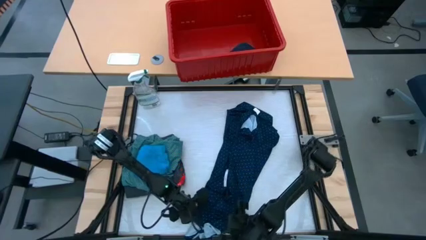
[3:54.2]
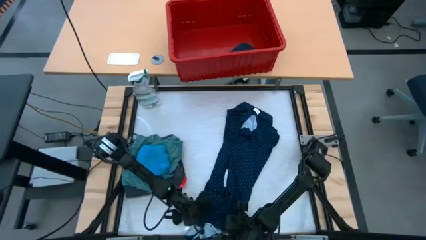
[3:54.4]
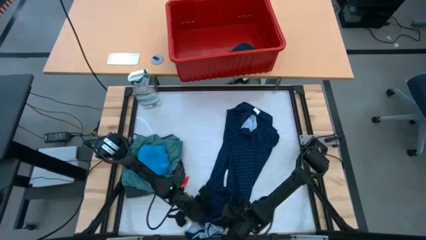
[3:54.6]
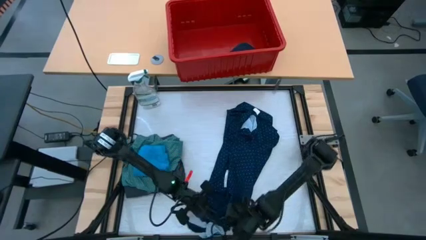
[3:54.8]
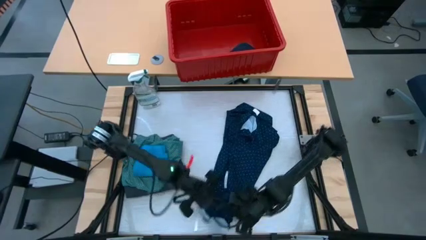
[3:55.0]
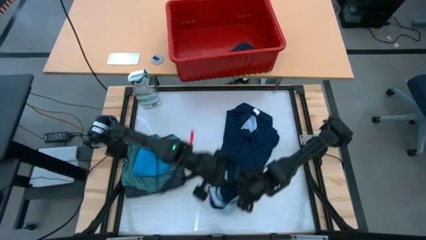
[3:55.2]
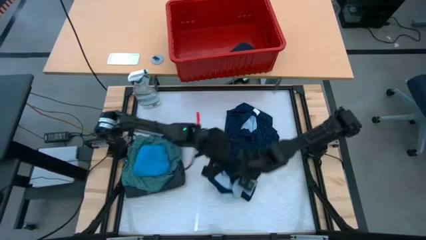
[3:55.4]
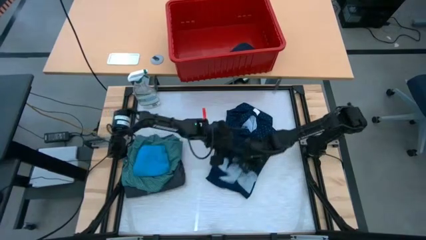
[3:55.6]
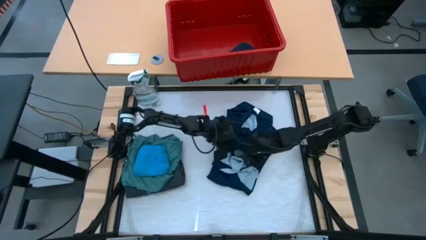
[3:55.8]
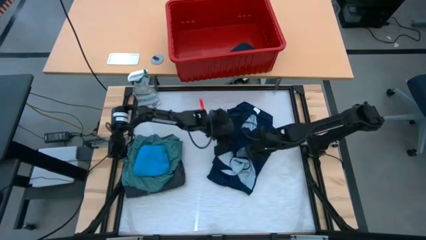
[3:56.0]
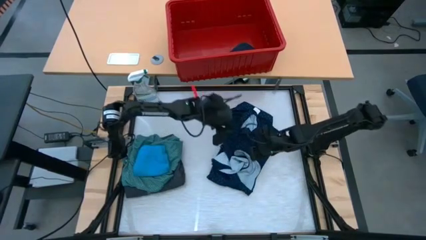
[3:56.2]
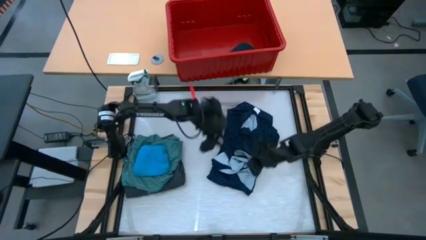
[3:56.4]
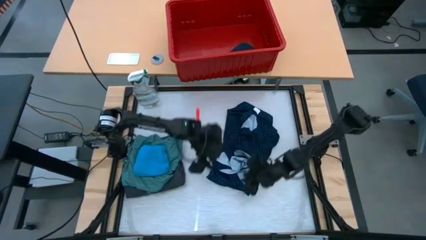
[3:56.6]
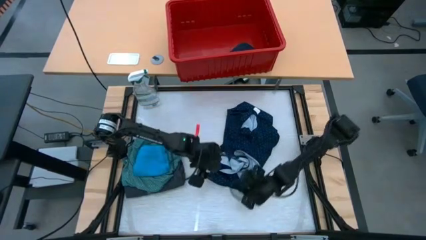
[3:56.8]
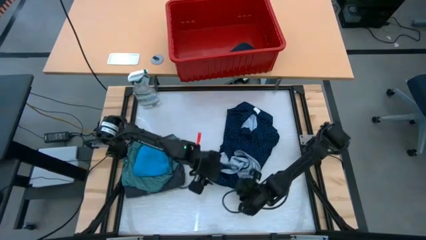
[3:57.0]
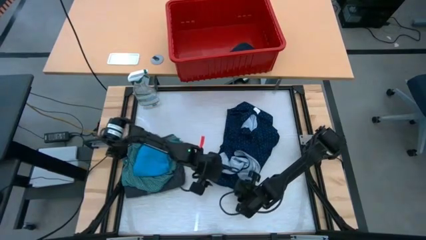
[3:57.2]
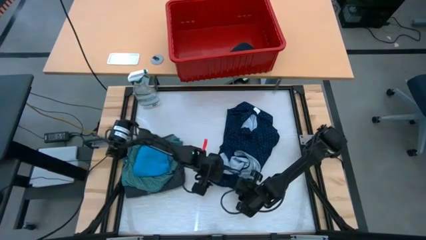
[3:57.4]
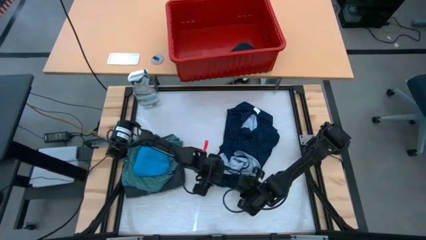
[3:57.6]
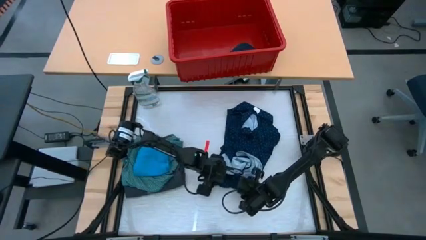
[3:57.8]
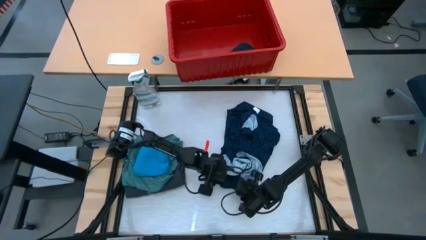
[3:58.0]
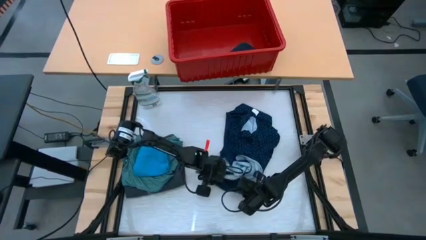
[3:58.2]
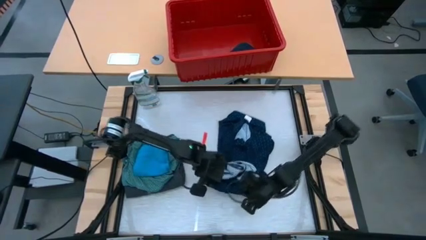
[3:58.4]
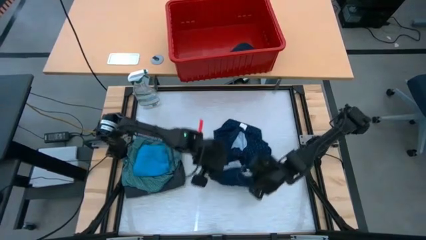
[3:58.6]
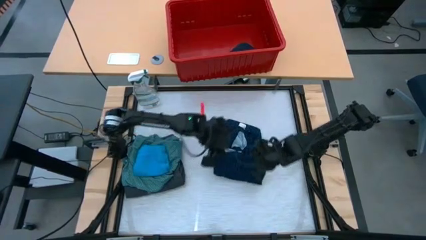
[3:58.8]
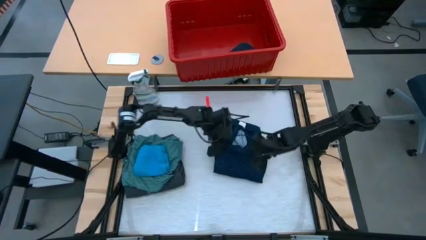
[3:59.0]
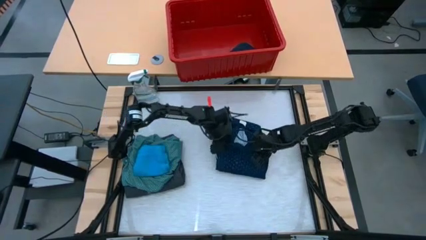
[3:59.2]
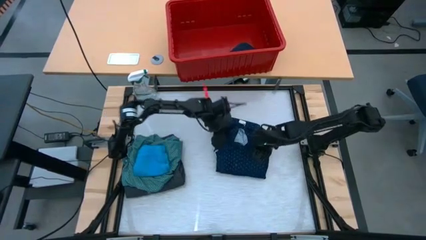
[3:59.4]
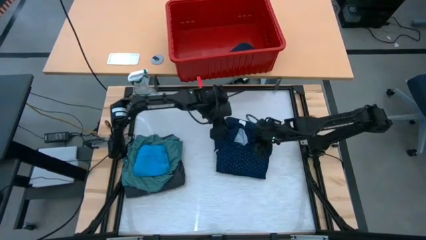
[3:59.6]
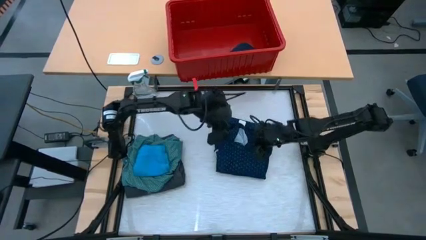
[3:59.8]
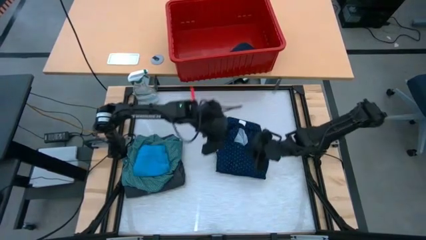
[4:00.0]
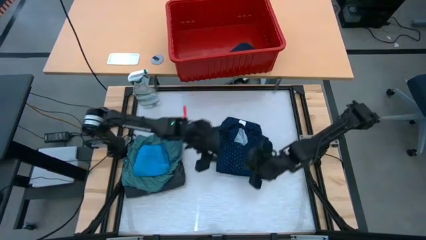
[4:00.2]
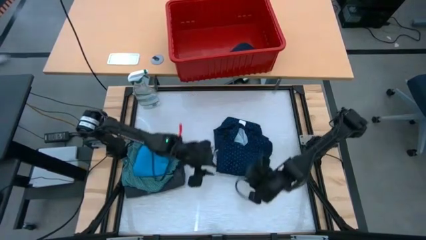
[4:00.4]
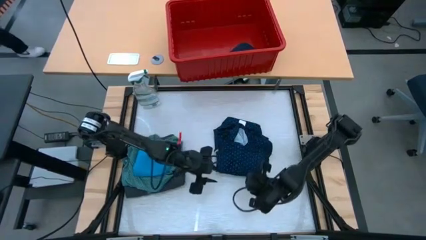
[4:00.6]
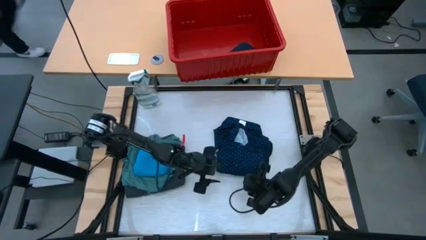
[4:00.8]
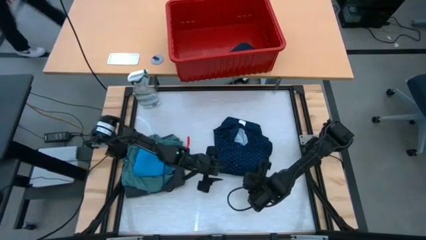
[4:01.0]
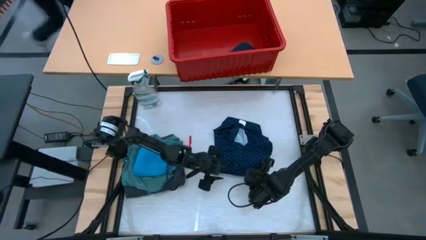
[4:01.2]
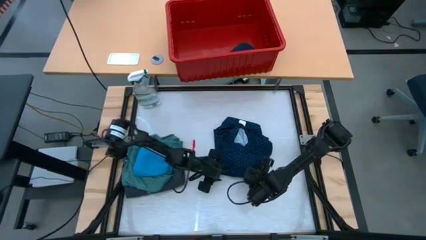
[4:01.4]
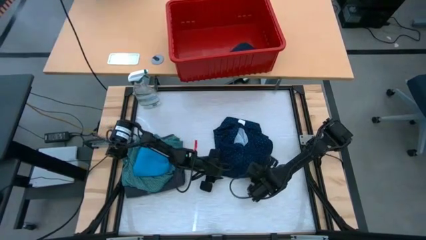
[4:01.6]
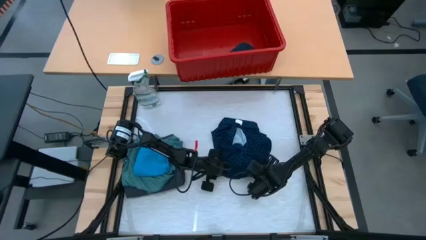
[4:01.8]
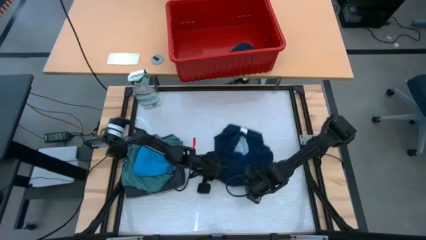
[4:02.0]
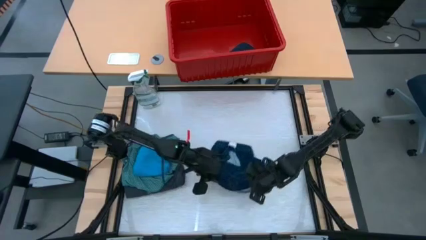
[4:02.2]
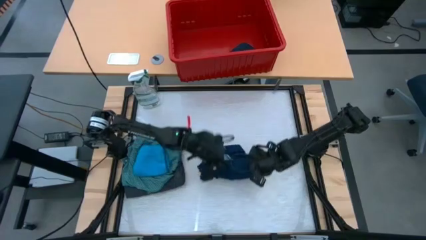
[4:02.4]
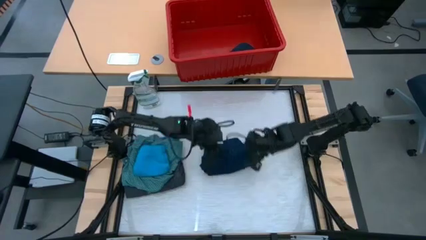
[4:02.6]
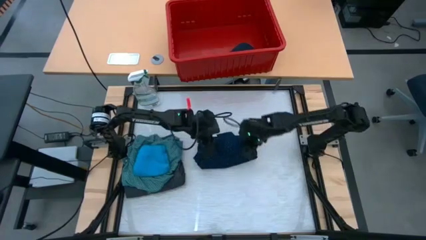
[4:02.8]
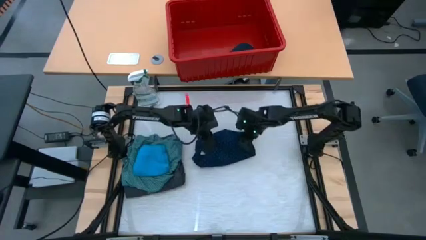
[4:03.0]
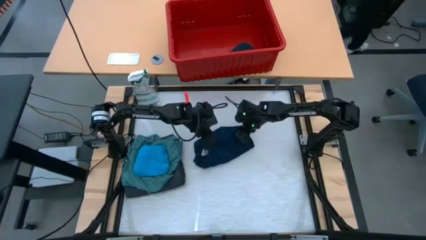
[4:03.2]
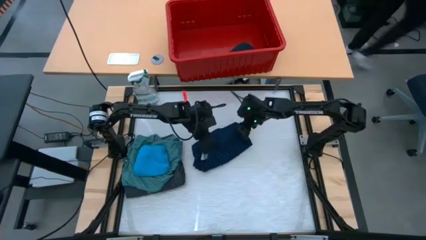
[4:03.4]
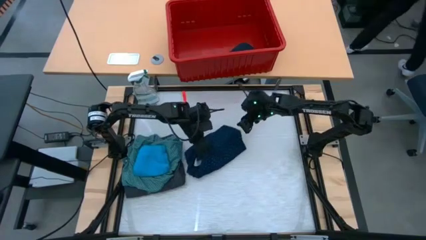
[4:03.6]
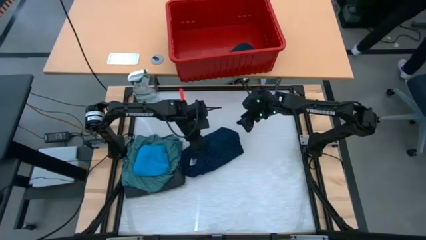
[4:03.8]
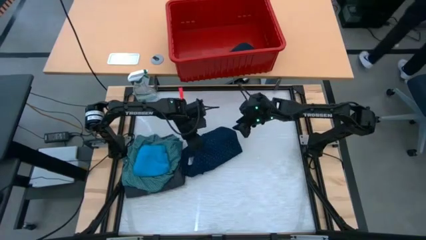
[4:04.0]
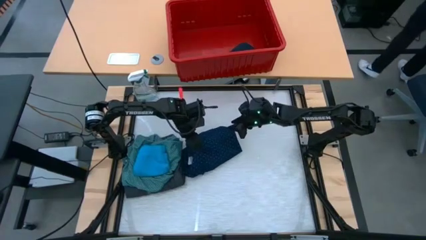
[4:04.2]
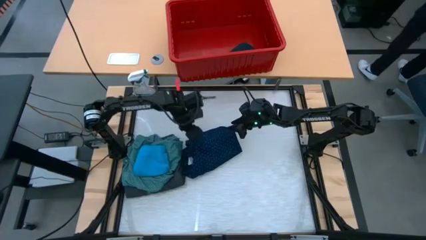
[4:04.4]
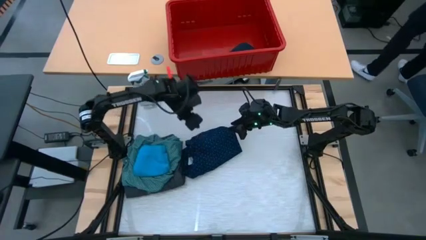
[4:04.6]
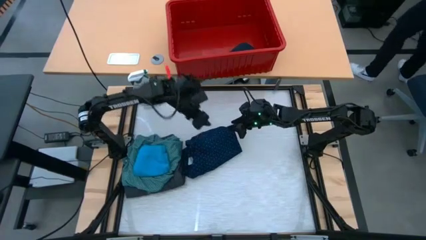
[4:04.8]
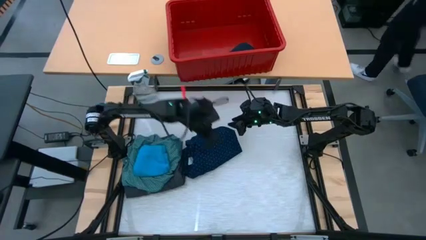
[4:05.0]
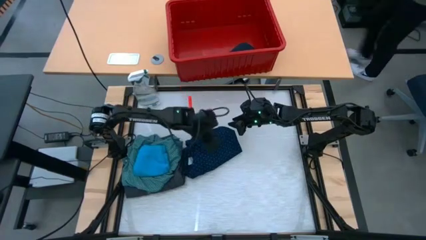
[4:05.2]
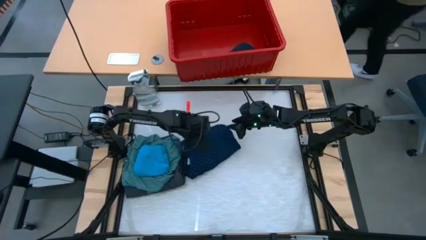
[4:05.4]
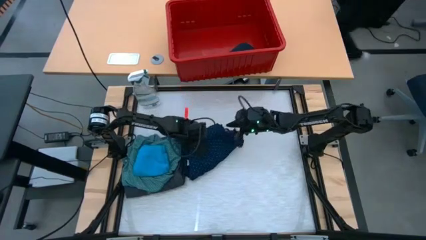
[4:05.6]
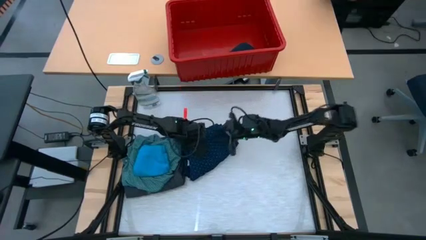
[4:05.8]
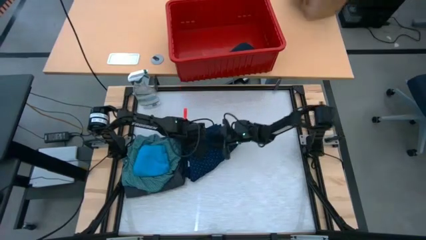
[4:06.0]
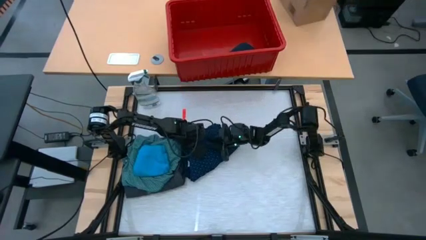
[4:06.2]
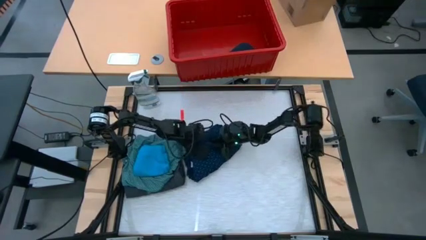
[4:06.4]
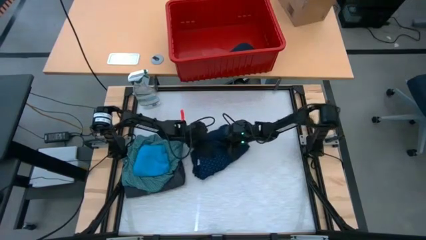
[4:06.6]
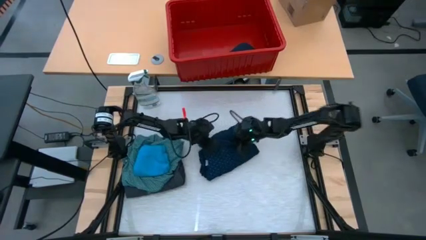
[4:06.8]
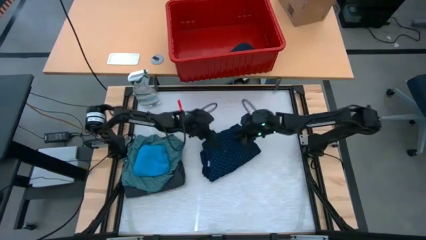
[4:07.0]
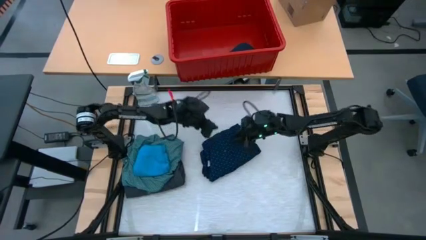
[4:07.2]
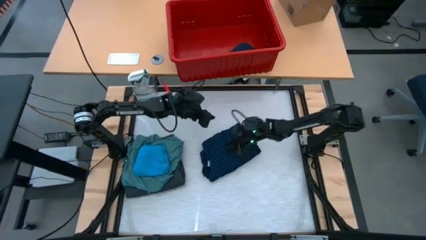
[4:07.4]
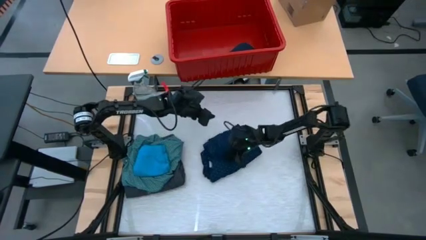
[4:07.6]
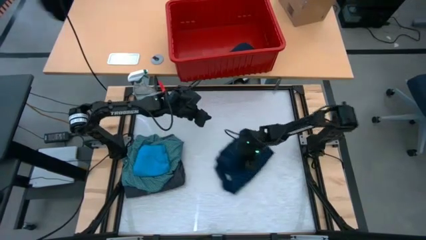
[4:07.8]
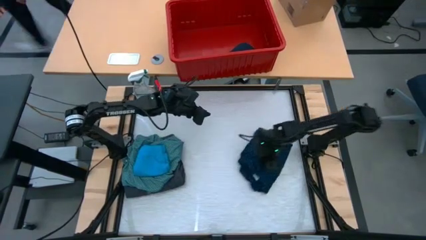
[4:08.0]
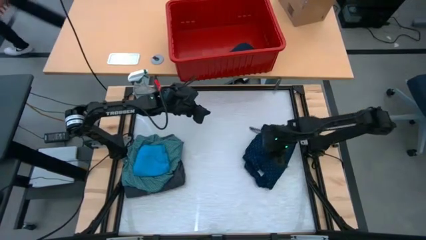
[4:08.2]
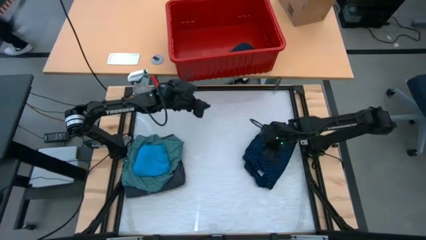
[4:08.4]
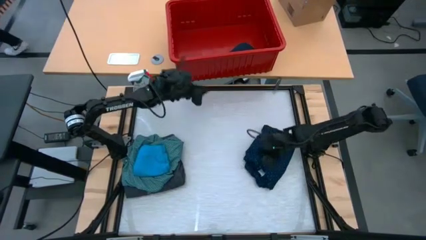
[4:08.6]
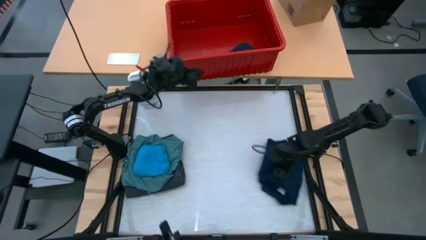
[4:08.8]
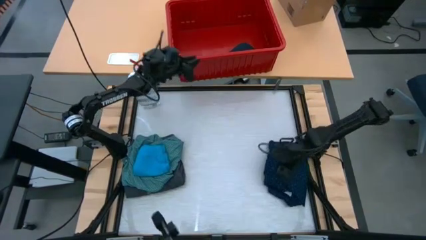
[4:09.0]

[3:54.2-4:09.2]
Task: Fold laundry
Fold the blue shirt
